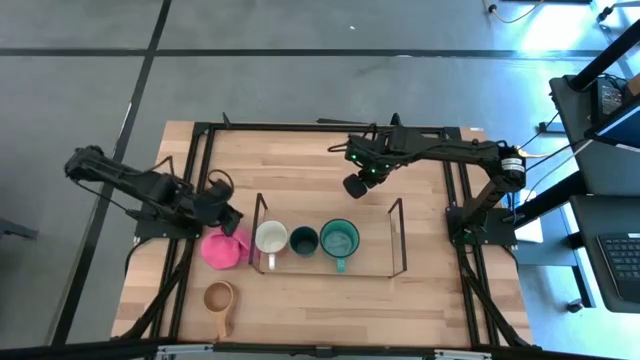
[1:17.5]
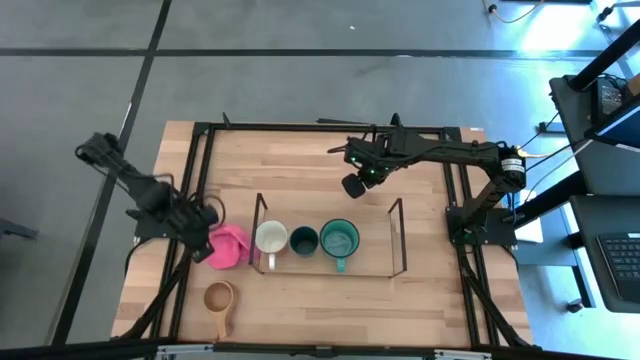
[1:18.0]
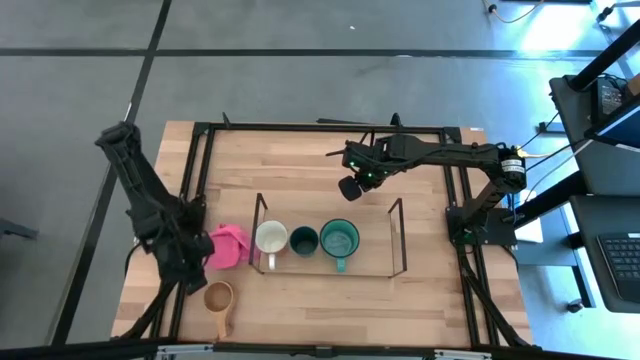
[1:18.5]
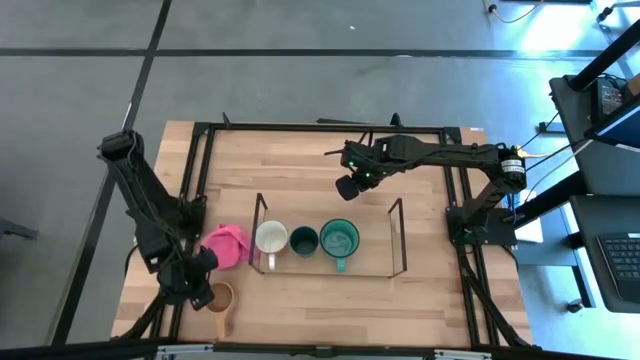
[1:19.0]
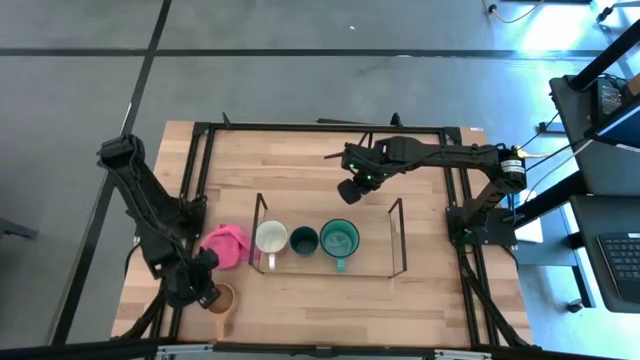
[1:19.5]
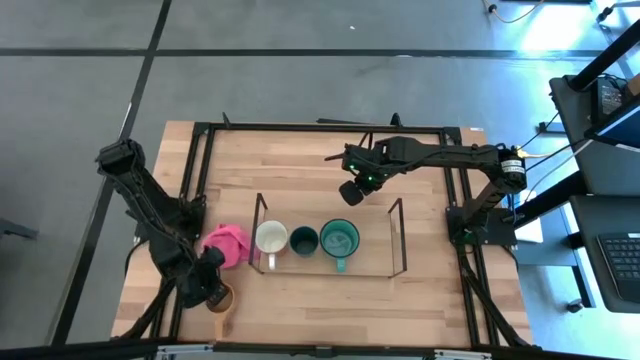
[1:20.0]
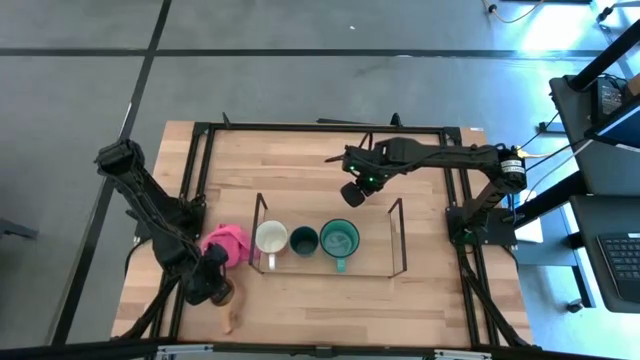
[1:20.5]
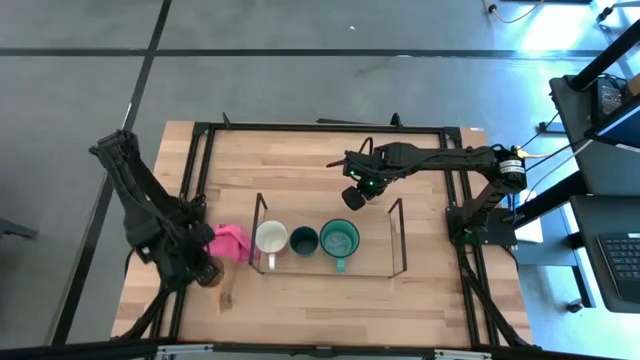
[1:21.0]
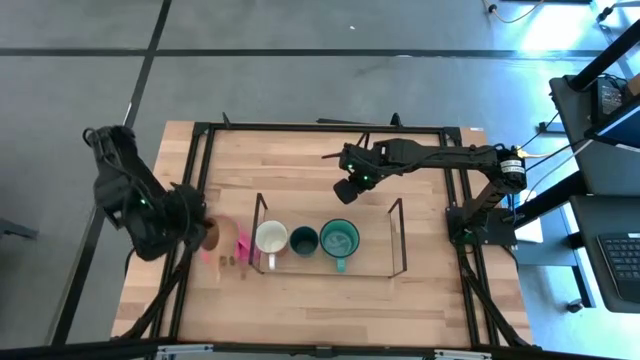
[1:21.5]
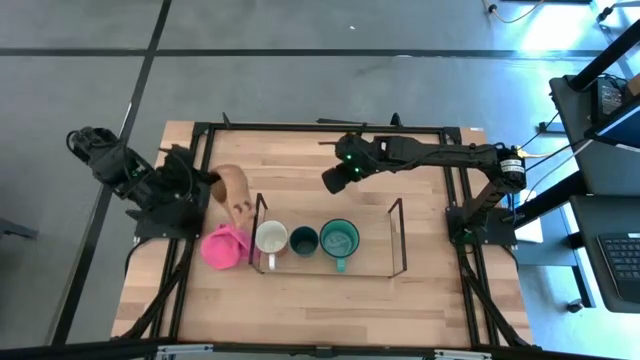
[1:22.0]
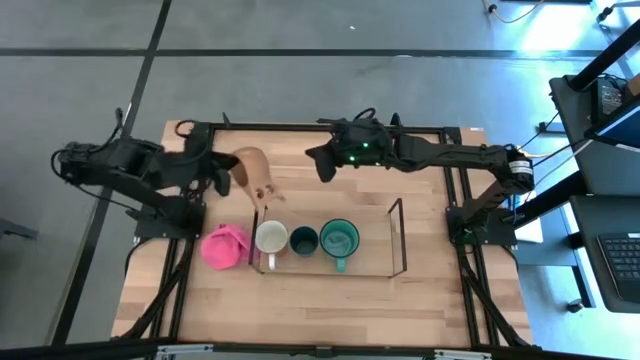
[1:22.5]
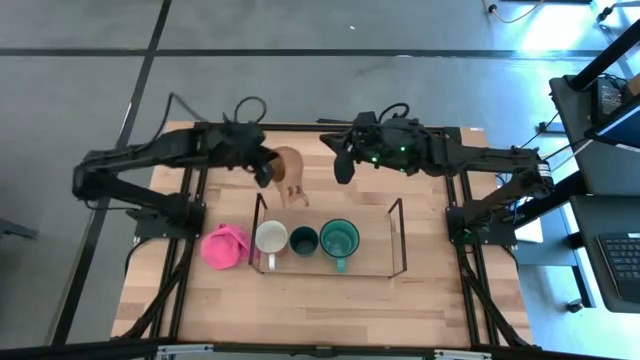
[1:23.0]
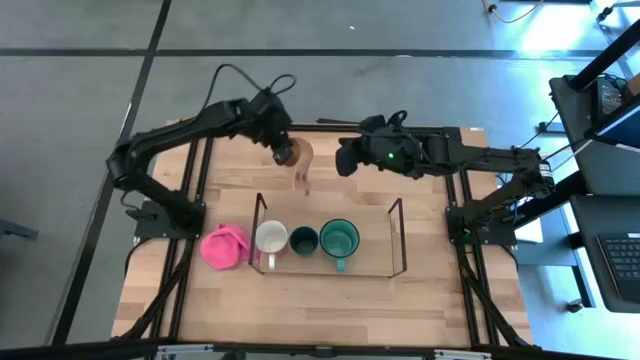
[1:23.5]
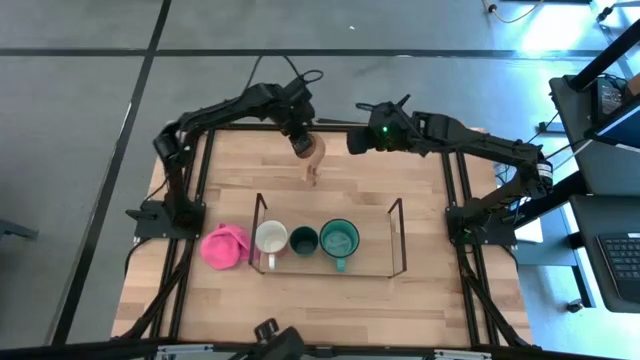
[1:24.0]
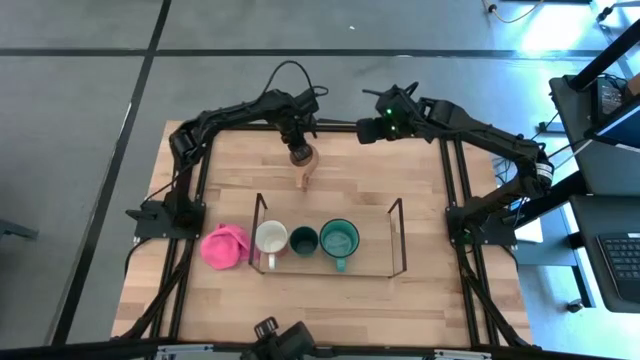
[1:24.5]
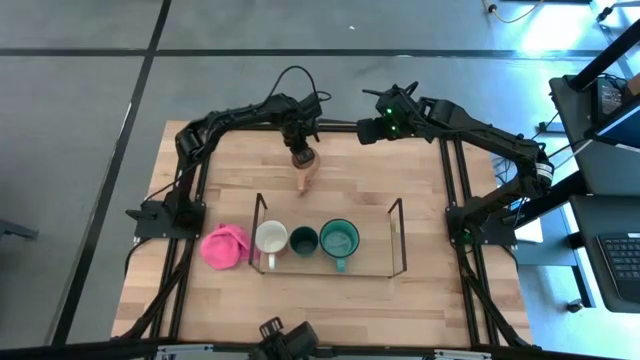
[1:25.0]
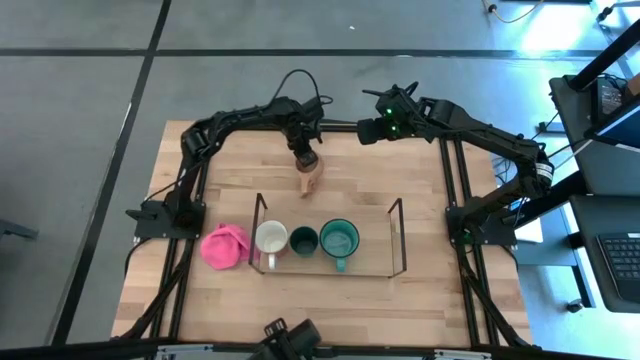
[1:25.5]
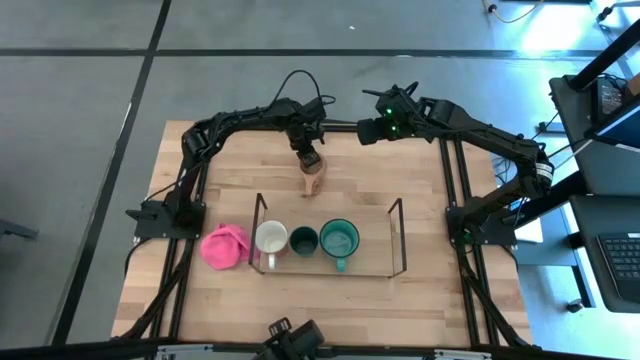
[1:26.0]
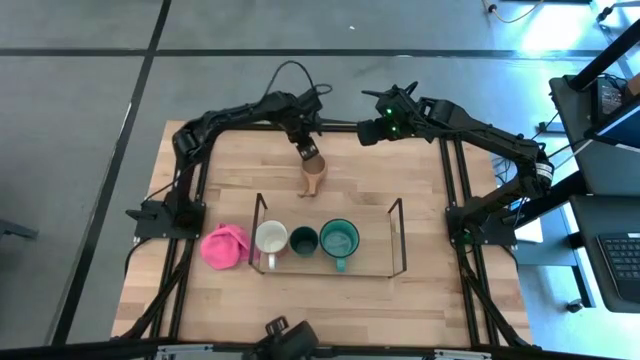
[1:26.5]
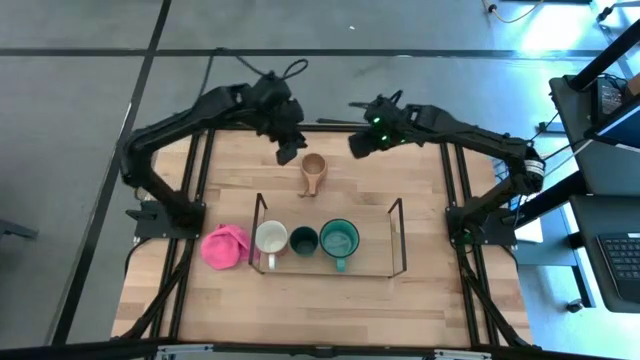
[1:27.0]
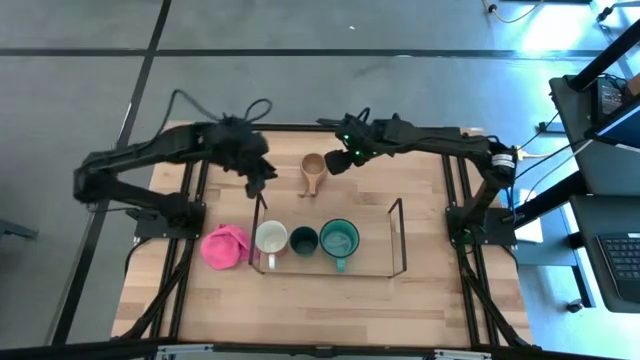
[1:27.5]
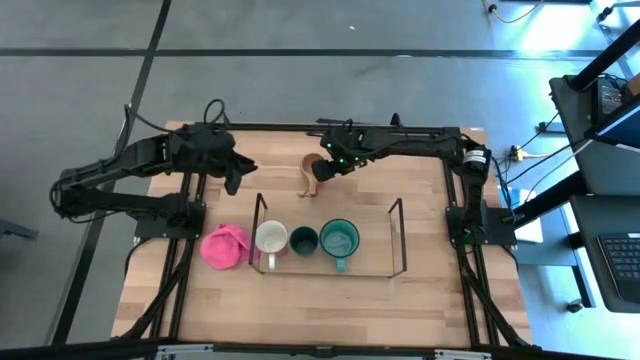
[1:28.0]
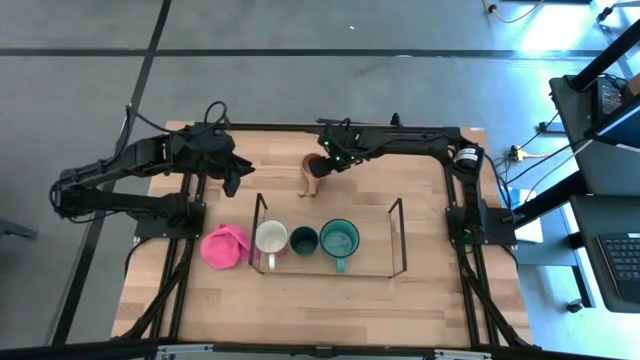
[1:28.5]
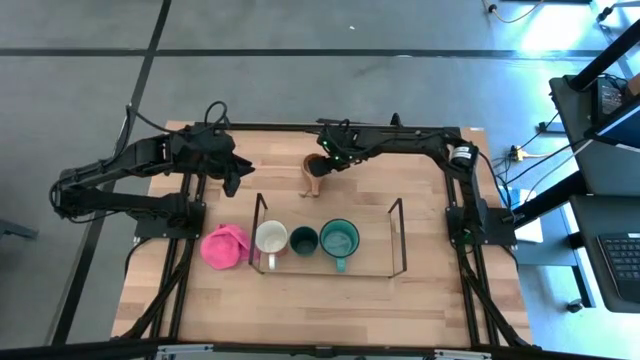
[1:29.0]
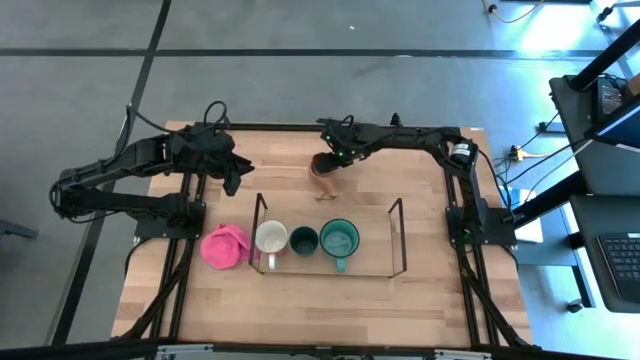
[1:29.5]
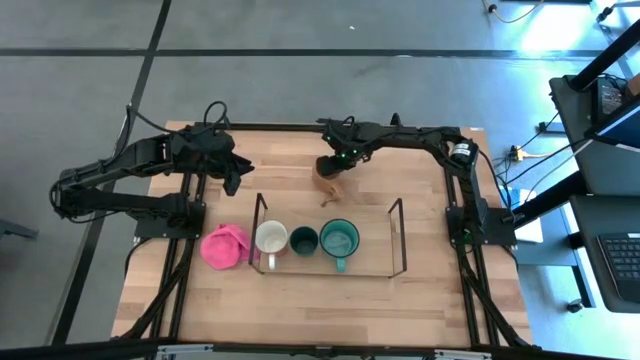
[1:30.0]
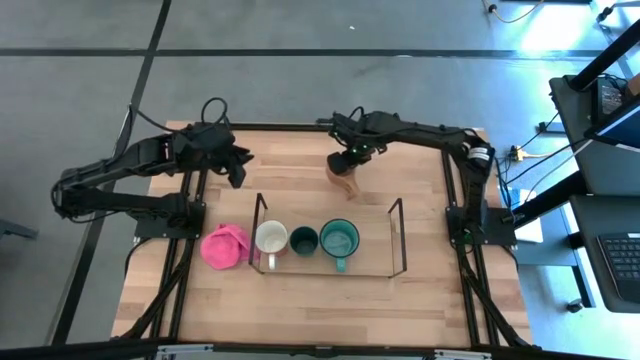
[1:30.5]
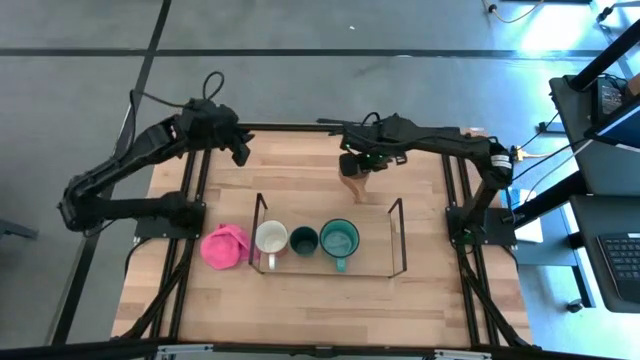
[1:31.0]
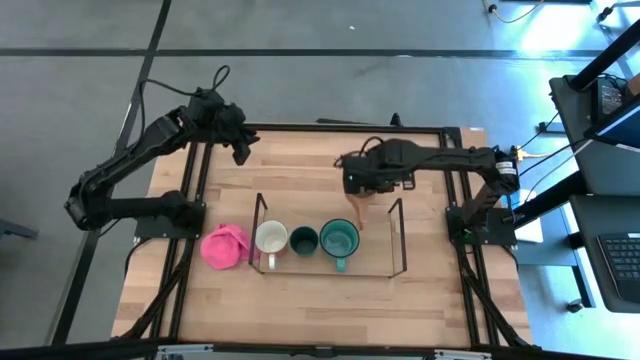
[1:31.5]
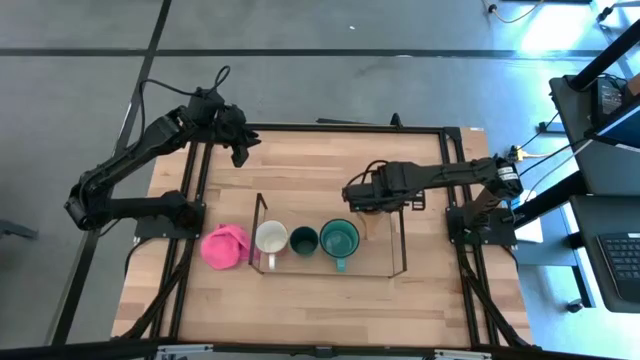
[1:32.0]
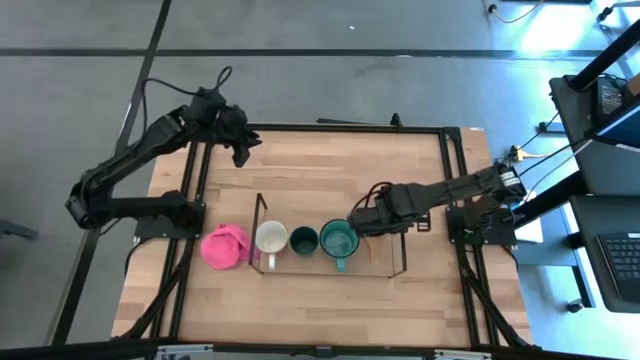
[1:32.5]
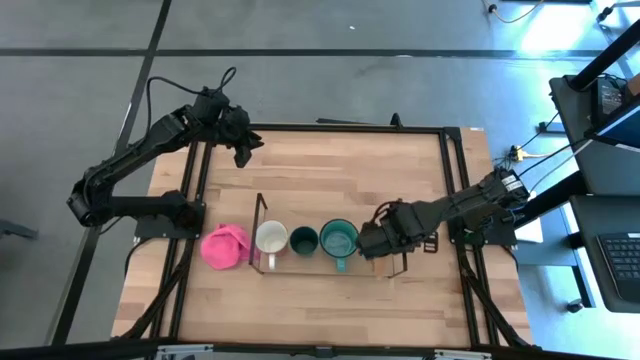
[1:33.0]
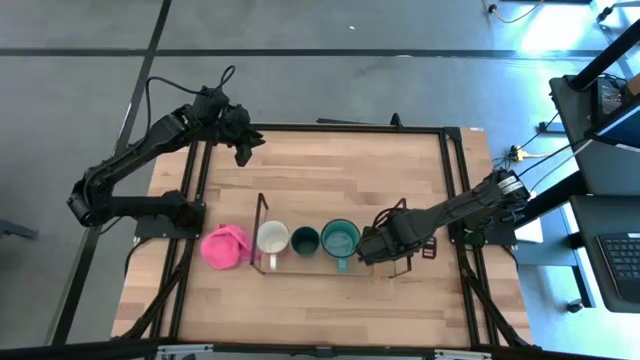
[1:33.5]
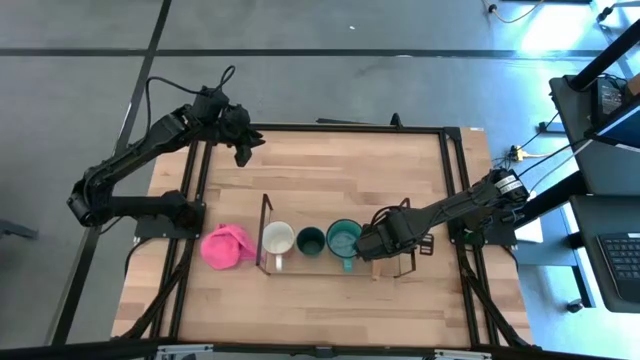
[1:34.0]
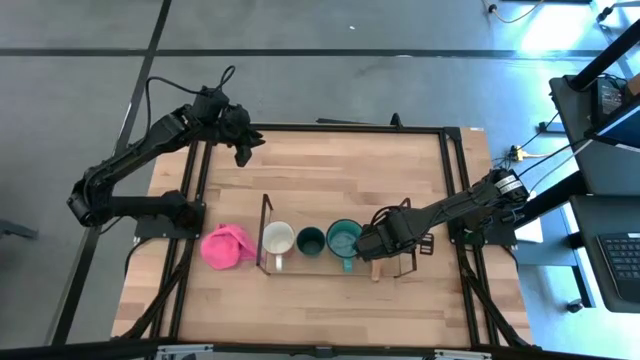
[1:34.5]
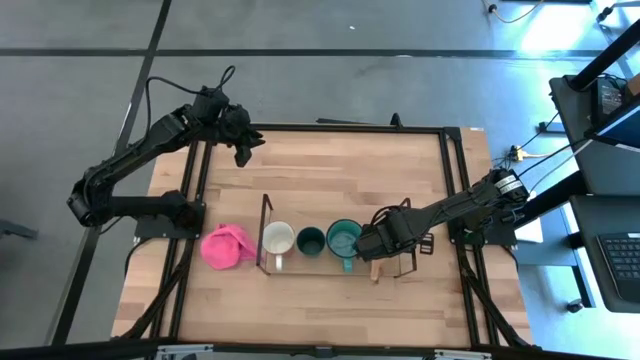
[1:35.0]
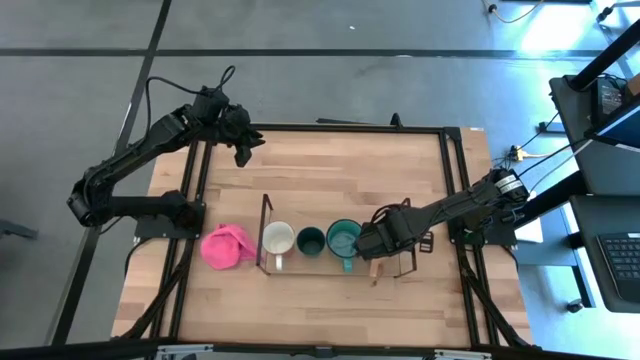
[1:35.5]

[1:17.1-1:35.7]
Task: Stack small to large cups/mugs on shelf
Put the wooden mug on the shelf

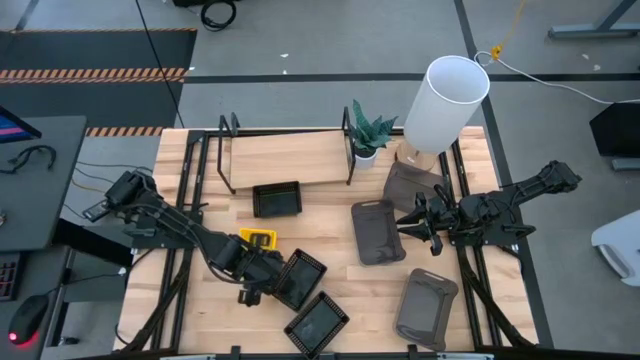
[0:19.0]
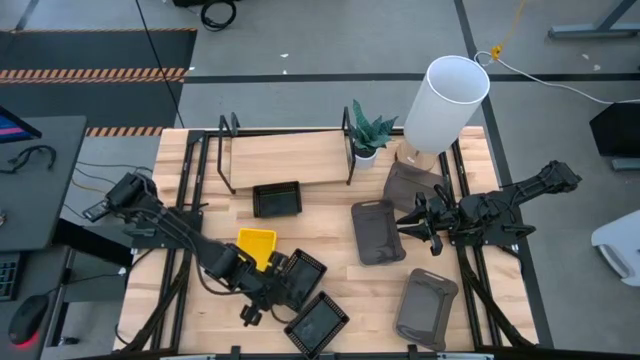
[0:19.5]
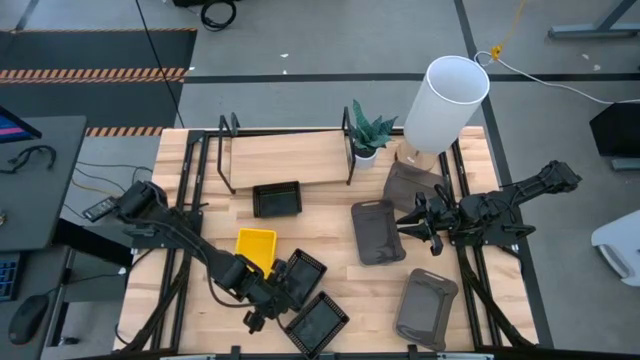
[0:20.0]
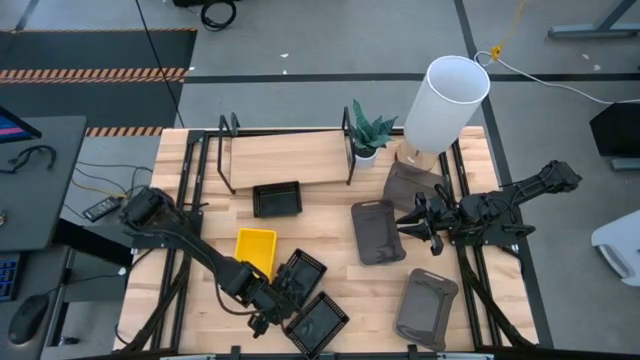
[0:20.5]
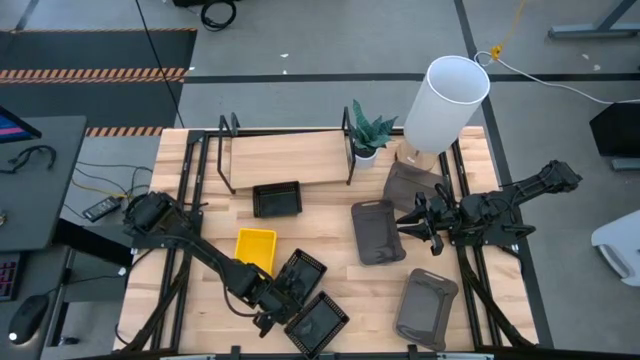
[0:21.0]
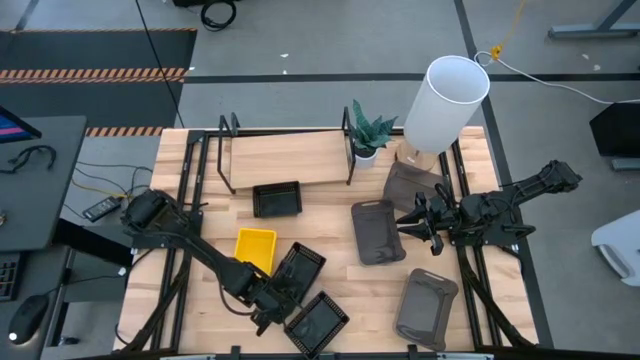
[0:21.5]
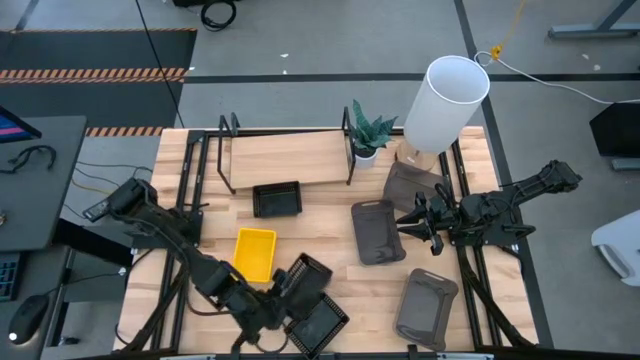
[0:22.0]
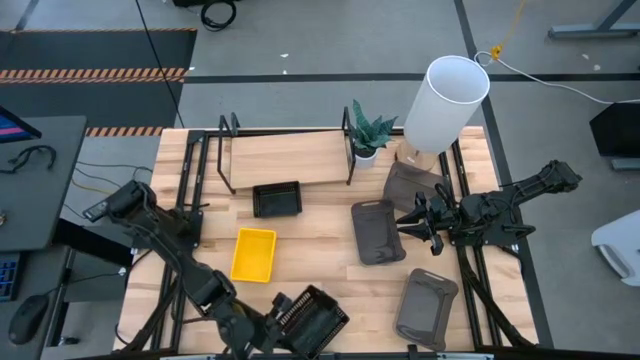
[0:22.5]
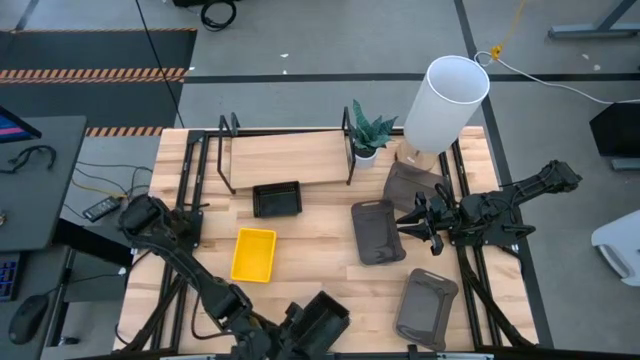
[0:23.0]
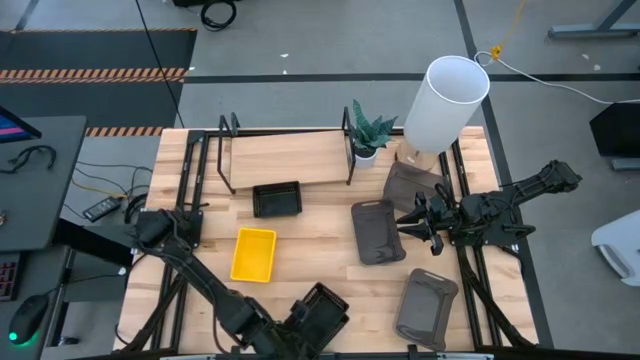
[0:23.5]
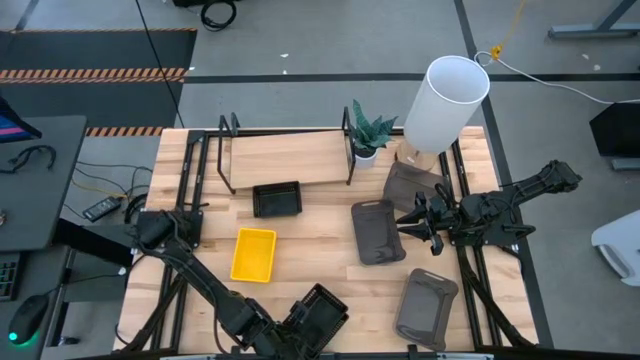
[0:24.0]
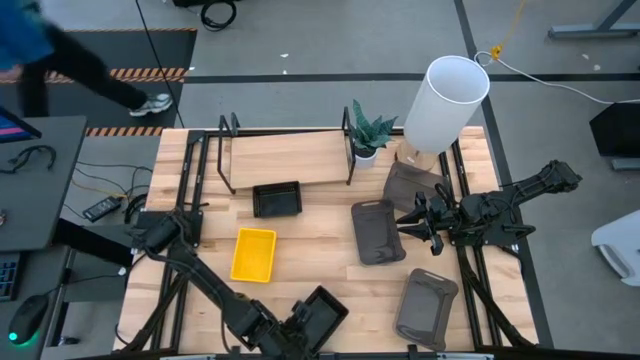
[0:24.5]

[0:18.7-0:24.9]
Task: Stack baskets on shelf by color
Stack the middle black bin on the bottom black bin
